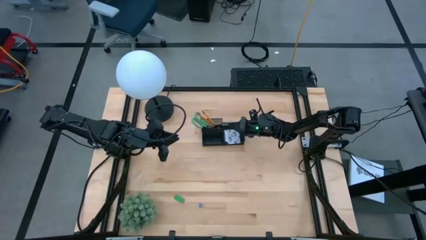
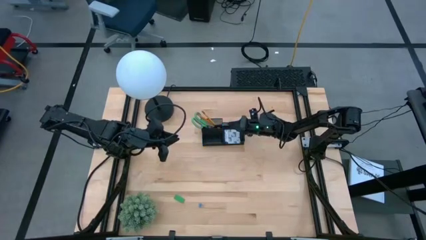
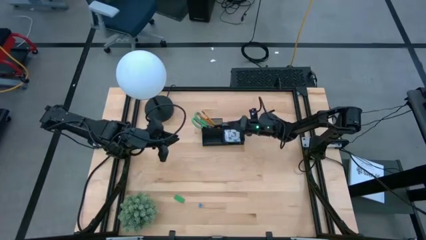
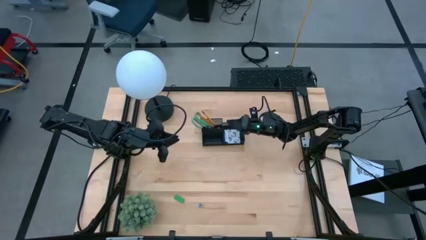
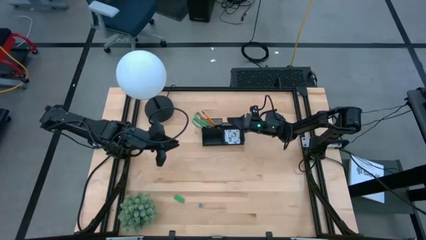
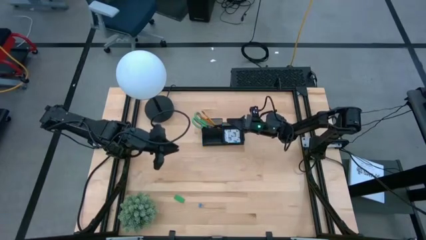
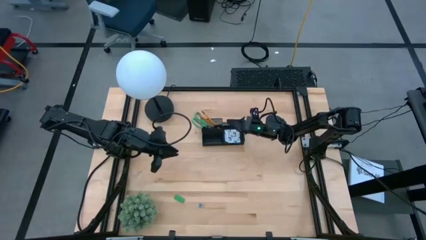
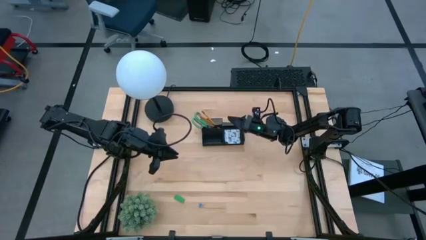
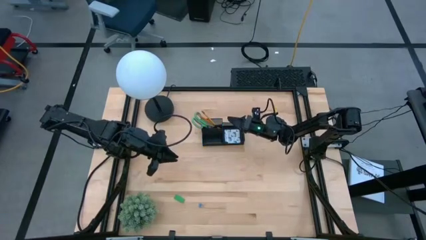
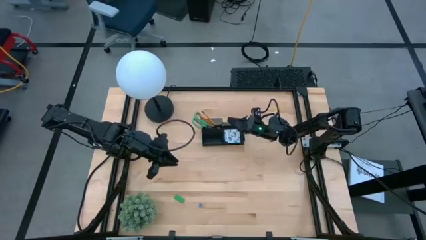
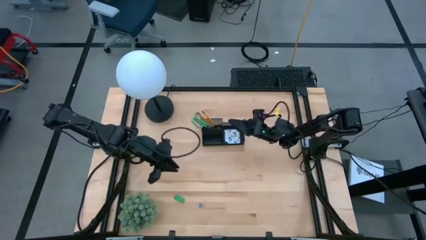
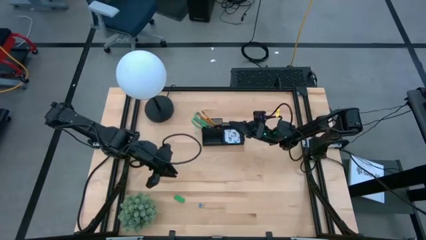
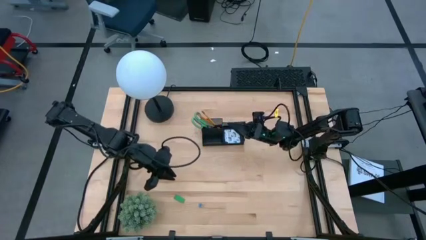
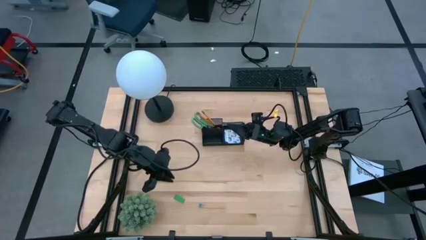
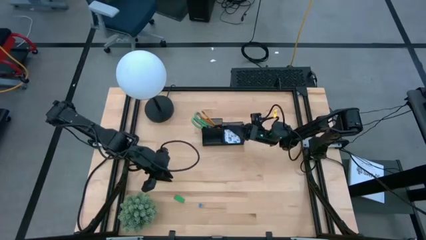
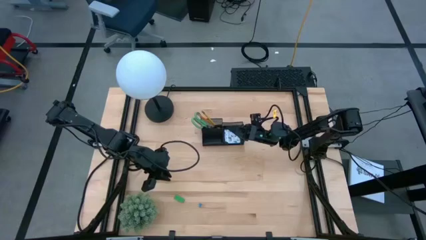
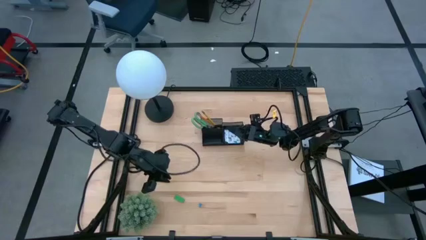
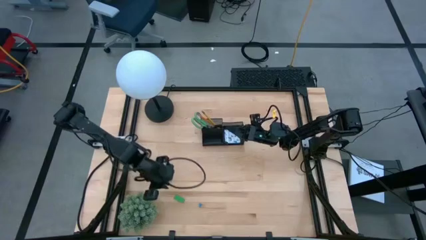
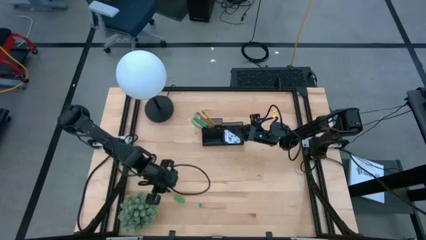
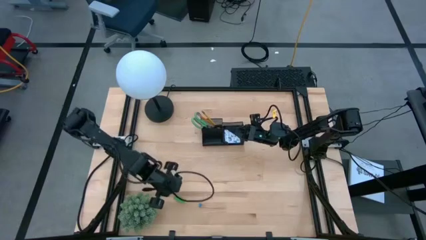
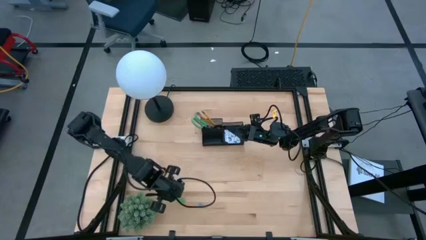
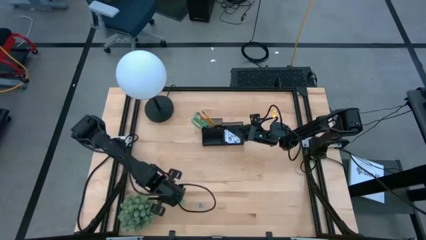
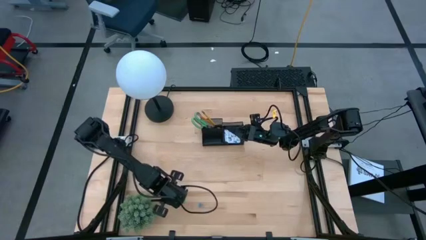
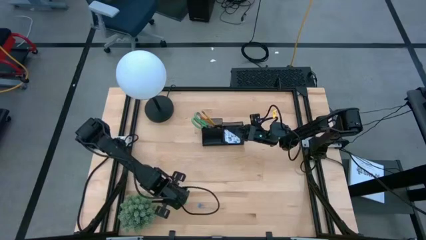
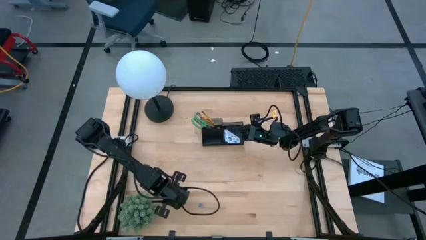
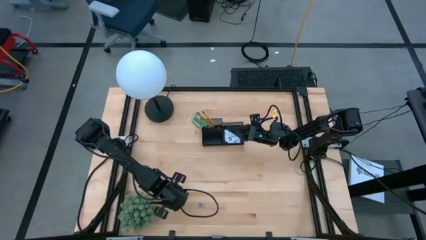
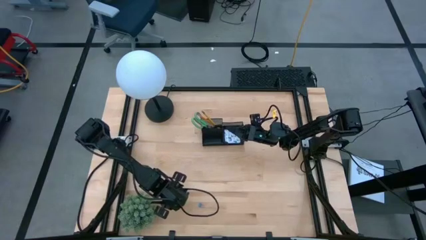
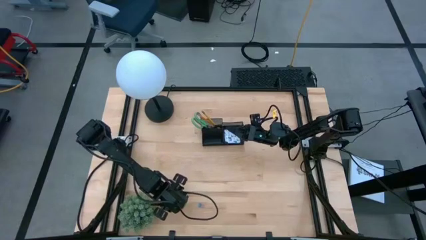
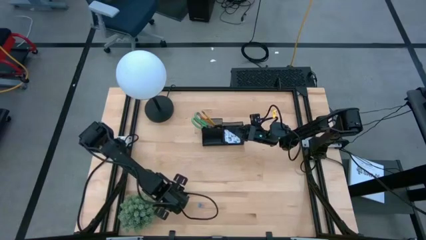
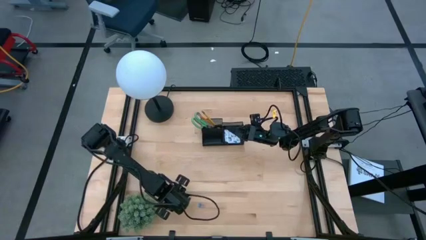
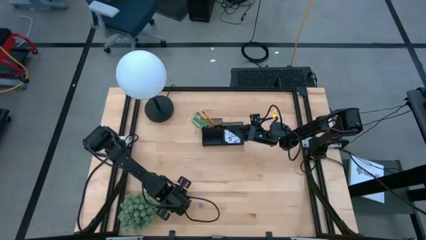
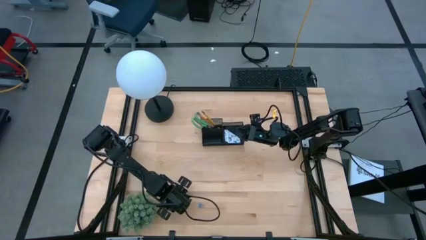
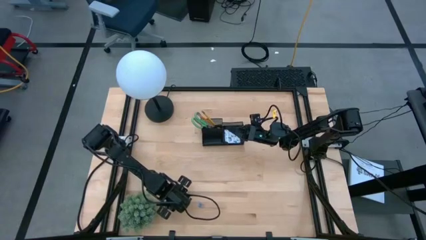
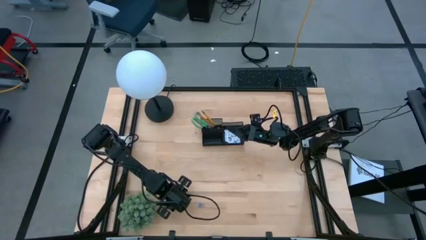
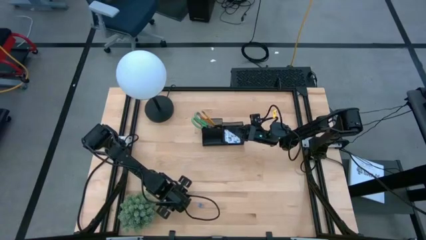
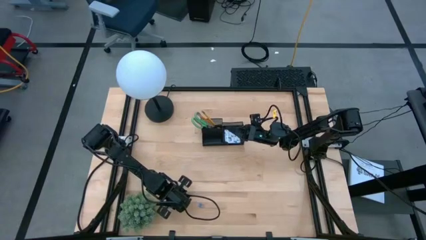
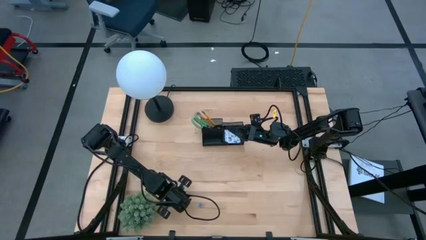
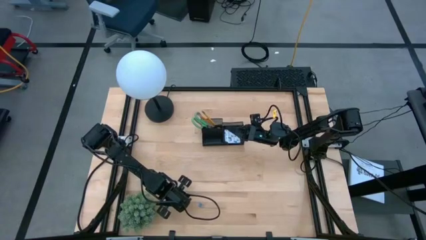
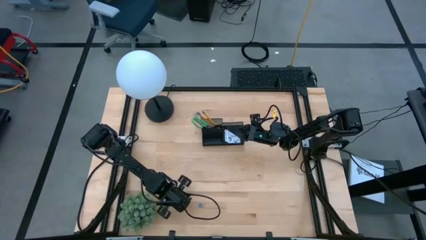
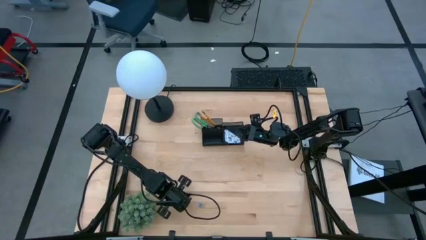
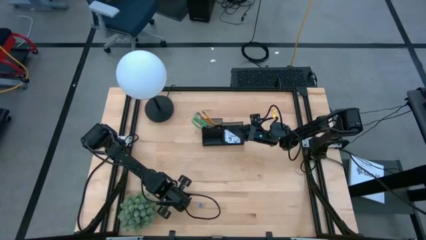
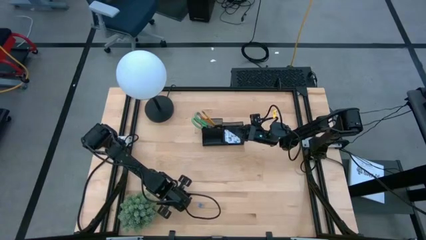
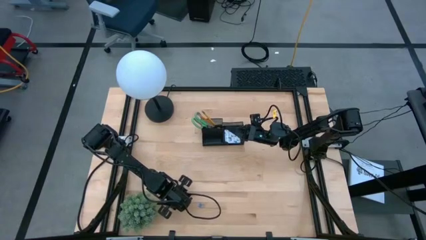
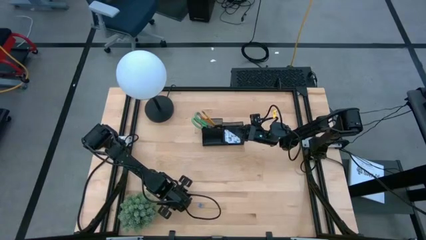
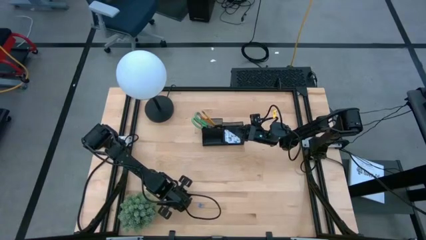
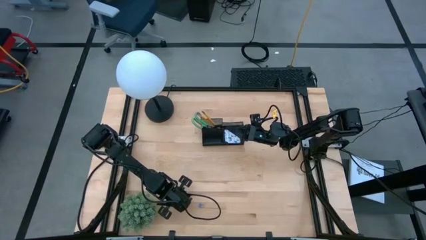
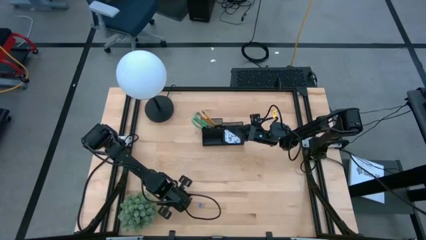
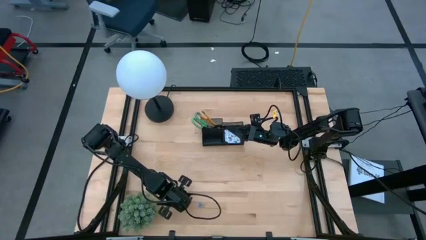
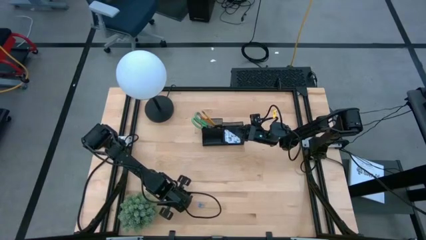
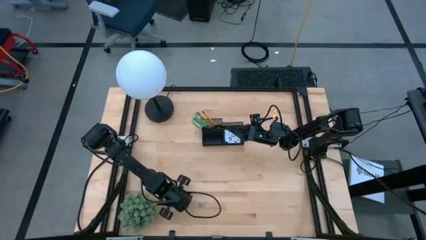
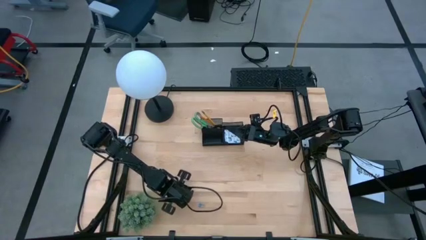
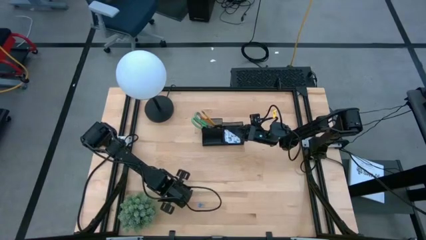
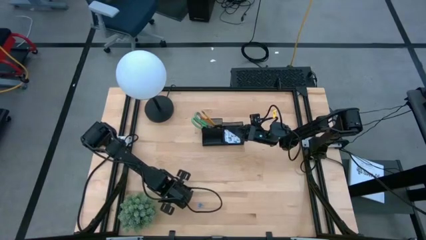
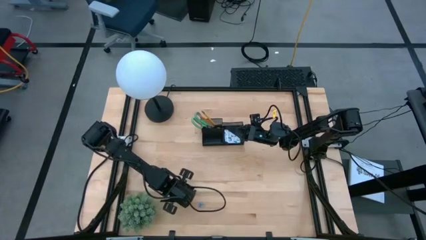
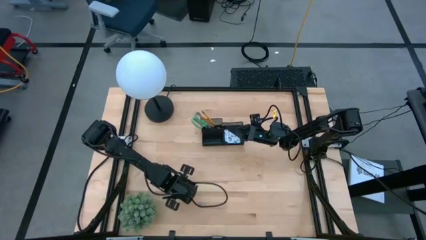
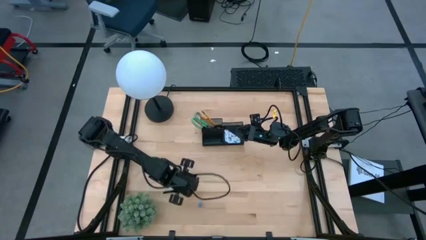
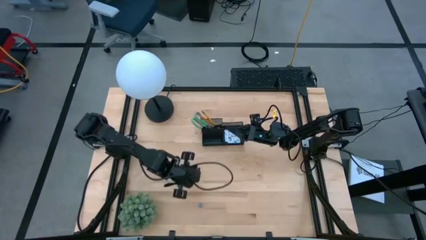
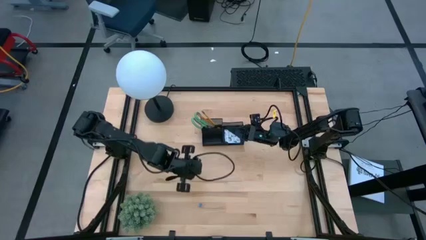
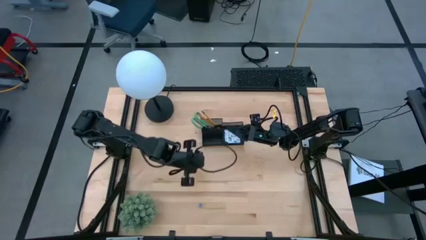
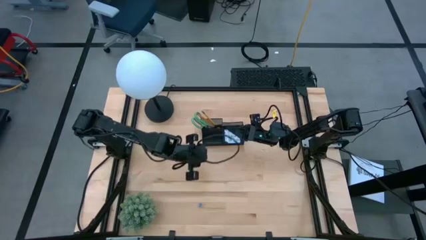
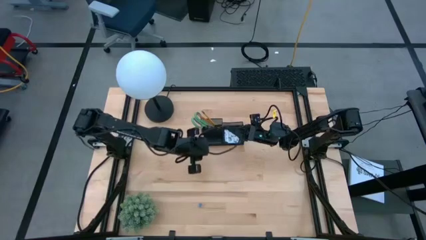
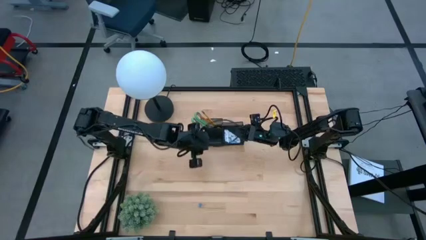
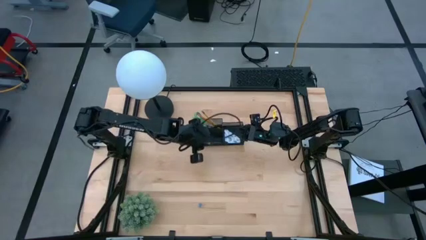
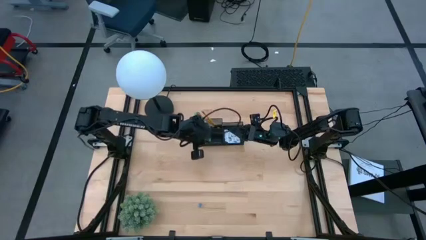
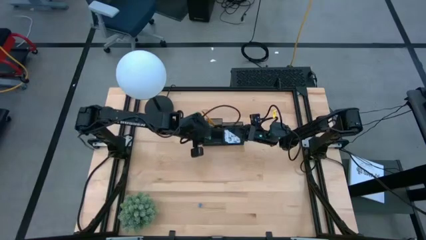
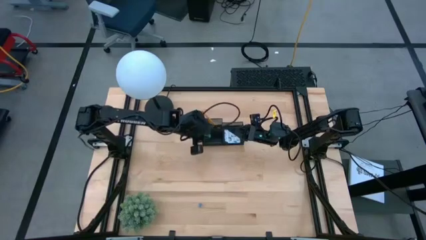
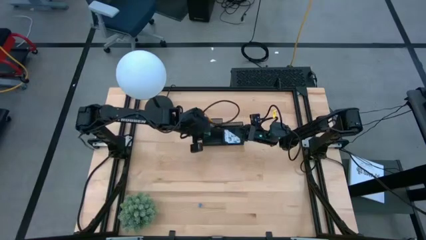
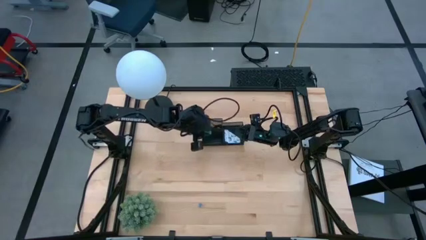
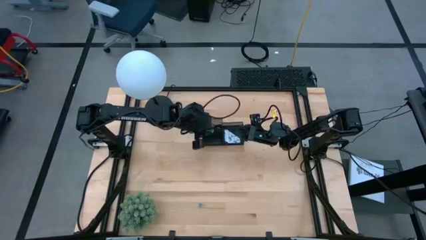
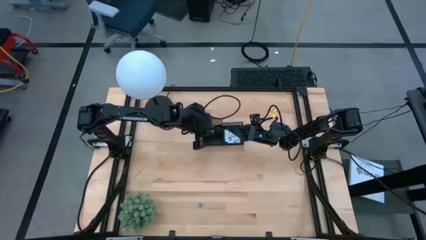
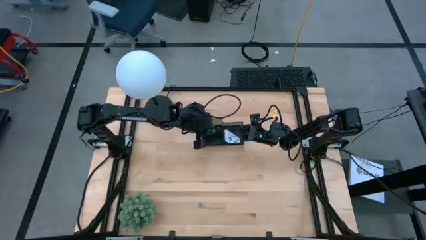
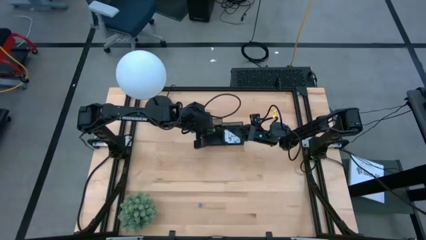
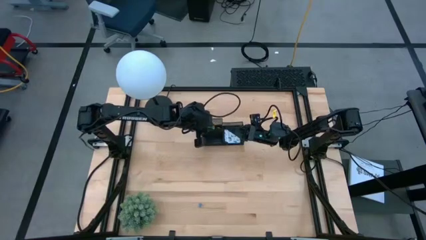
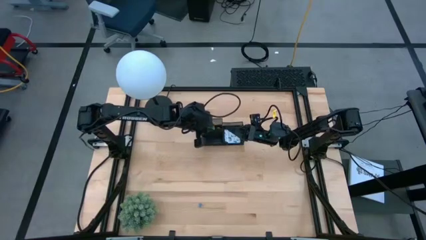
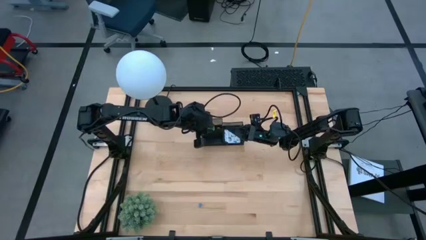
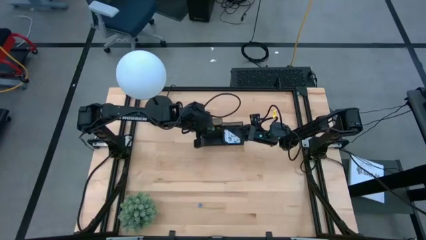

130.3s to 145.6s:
Task: Pick and place office supplies into organizer
Put the green eraser into the black desk organizer

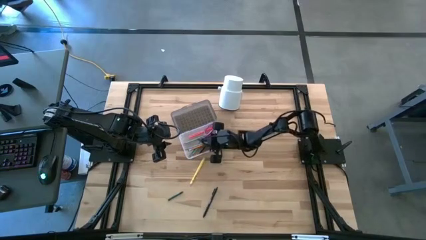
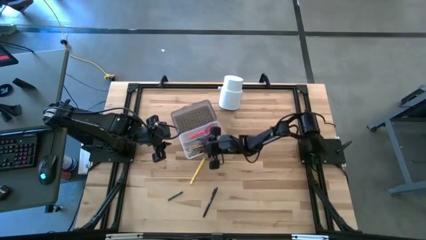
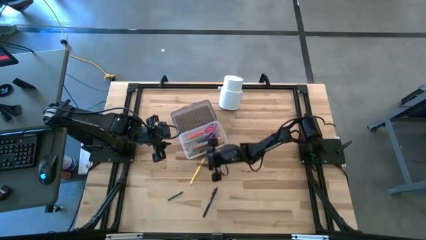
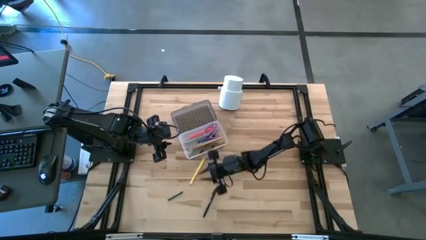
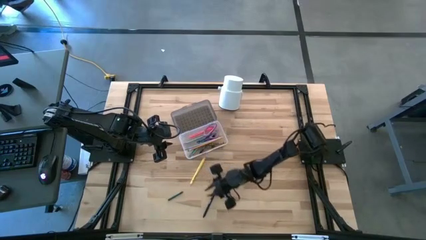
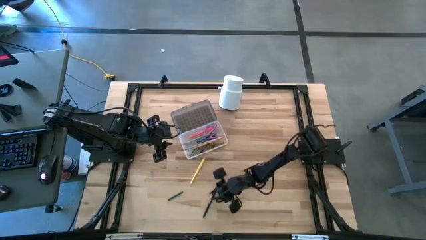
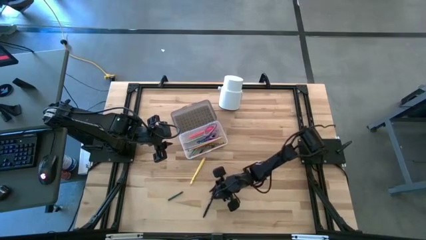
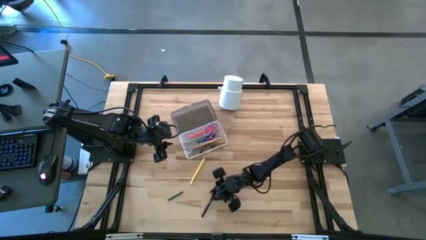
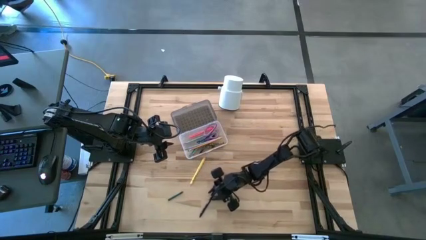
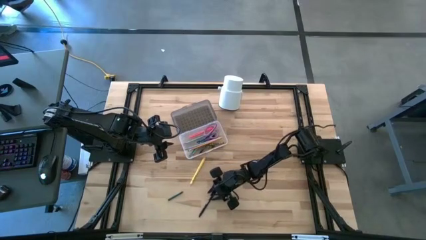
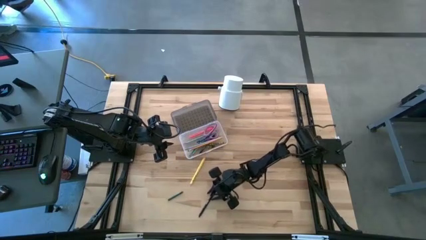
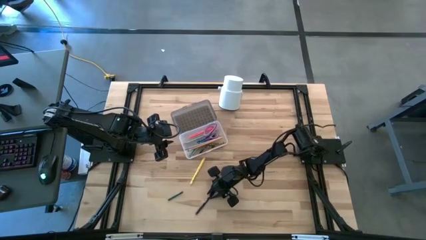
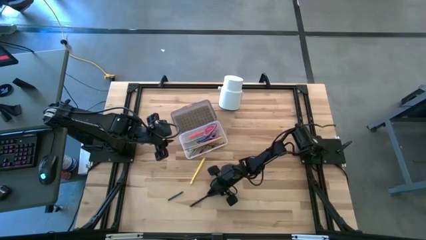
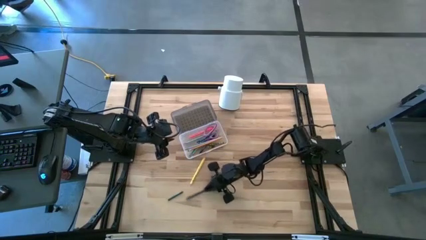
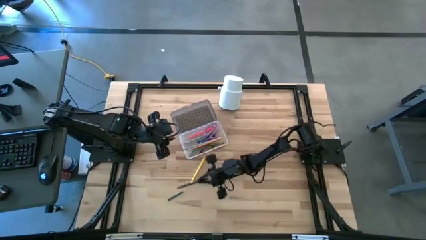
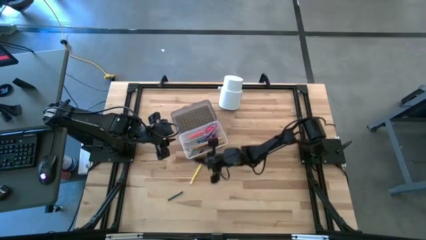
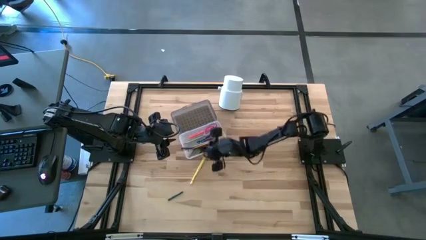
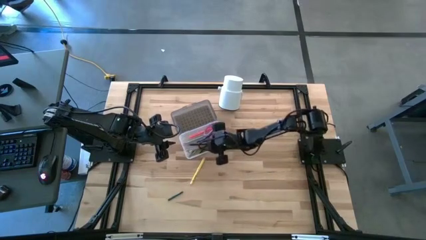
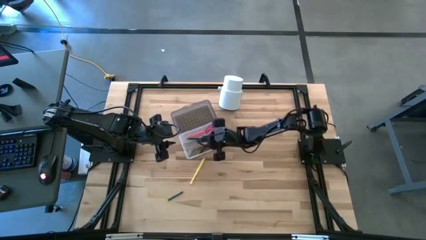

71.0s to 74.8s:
Task: Pick & place school supplies into a supply box
Put the black pen into the black supply box
